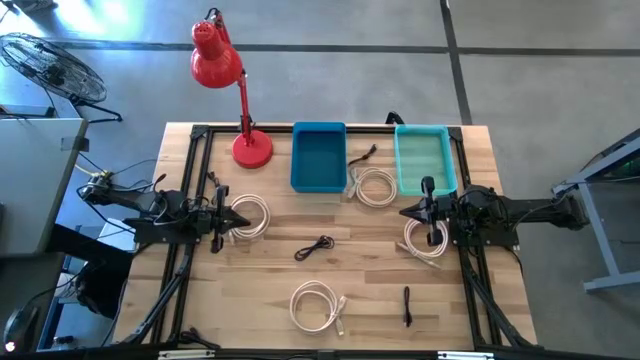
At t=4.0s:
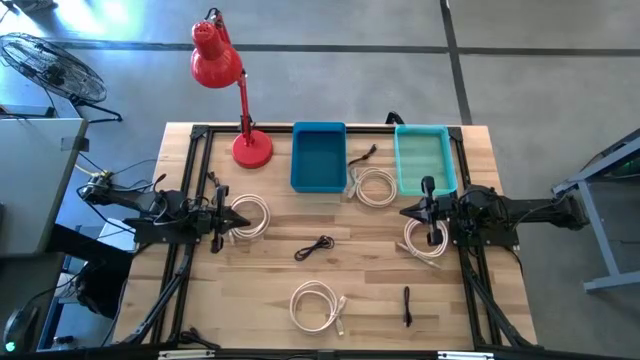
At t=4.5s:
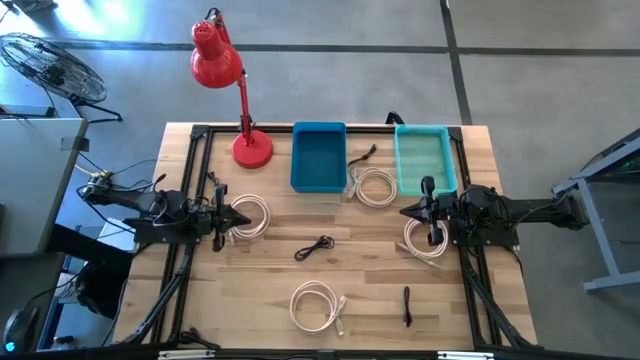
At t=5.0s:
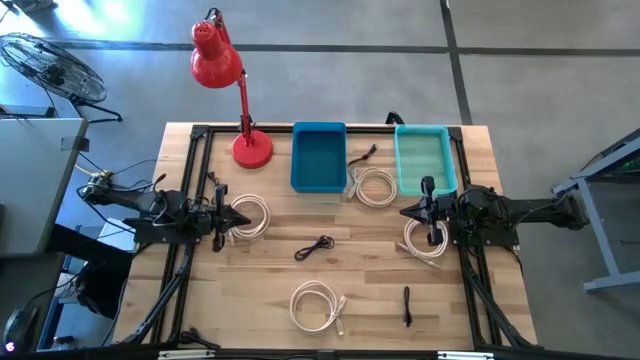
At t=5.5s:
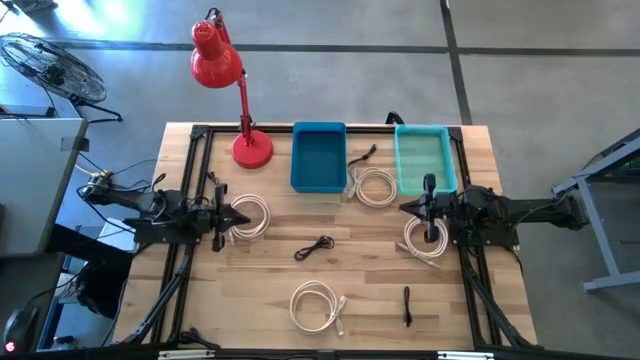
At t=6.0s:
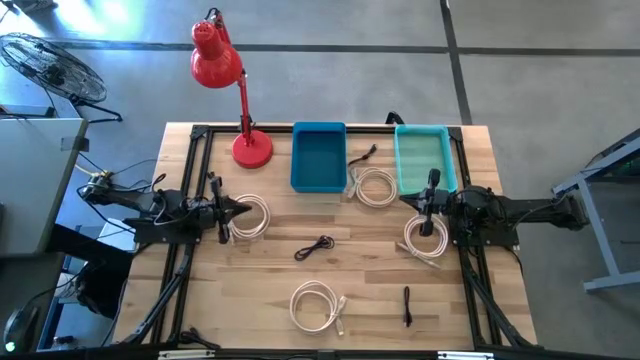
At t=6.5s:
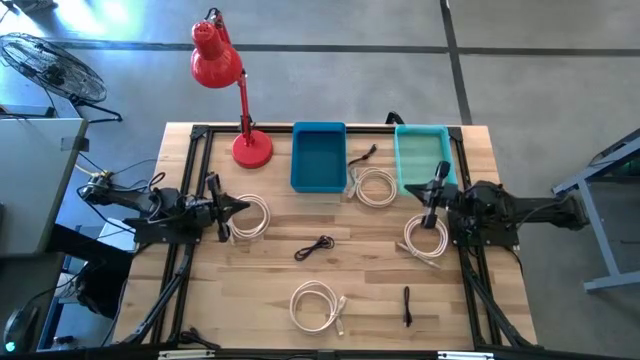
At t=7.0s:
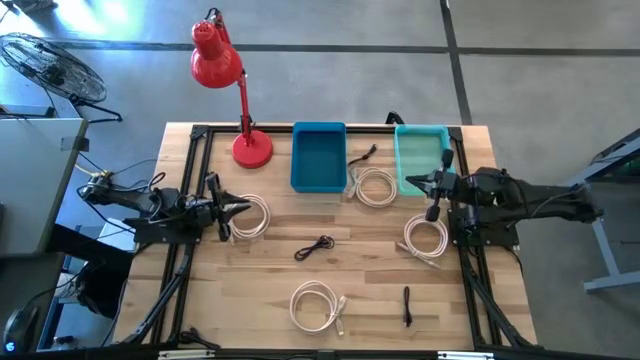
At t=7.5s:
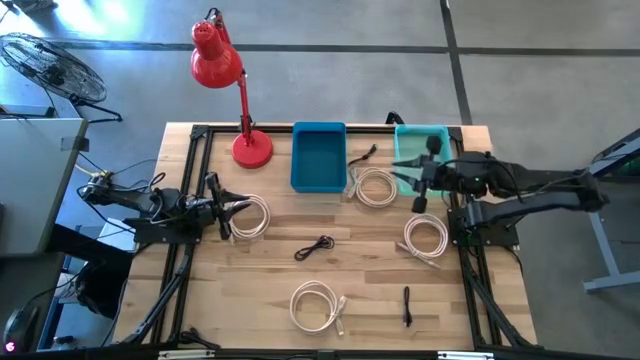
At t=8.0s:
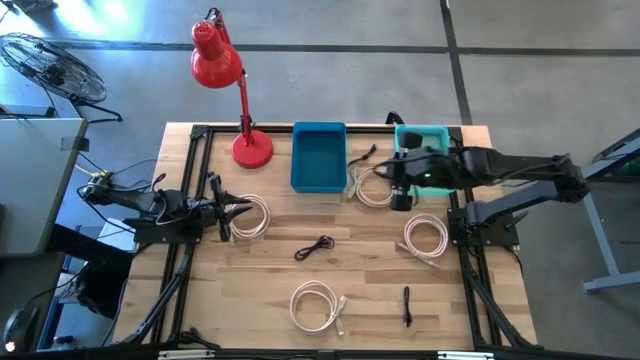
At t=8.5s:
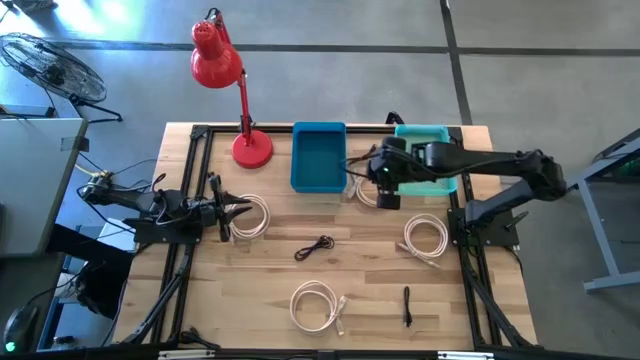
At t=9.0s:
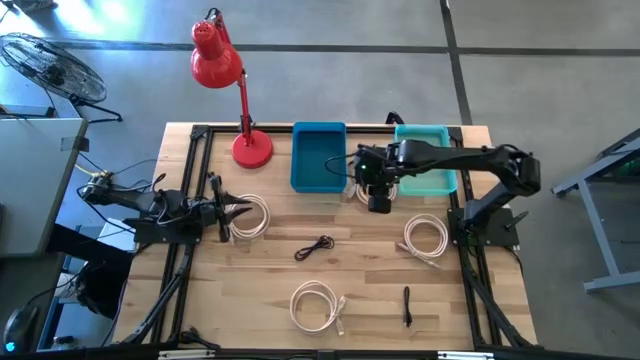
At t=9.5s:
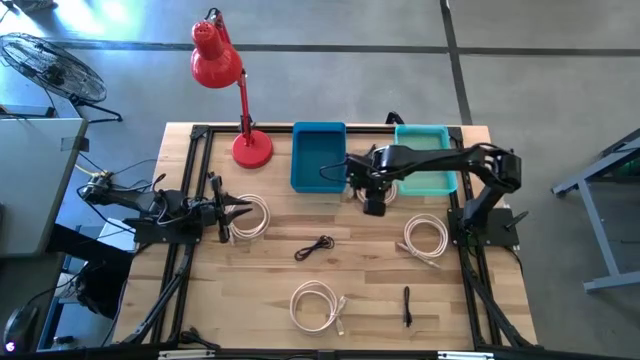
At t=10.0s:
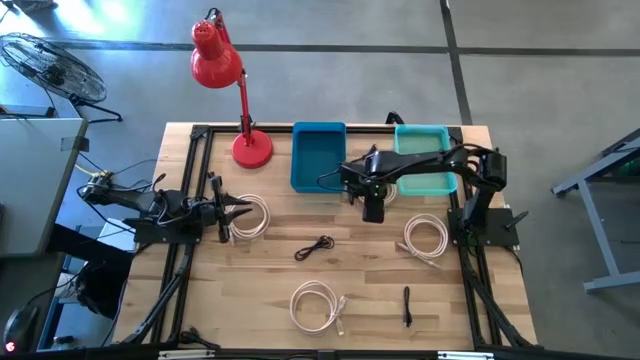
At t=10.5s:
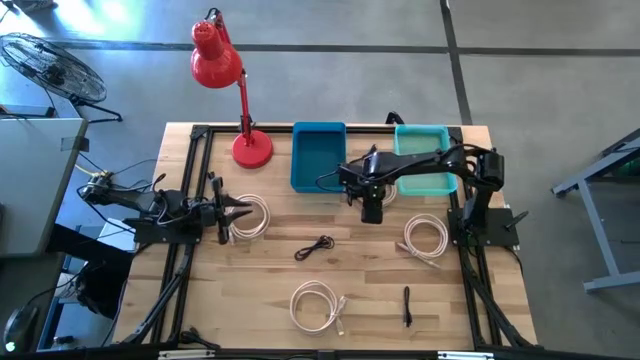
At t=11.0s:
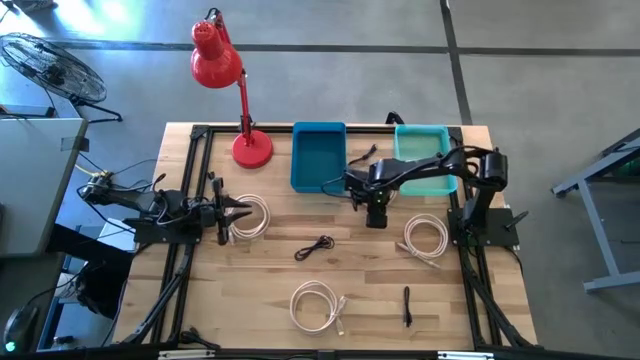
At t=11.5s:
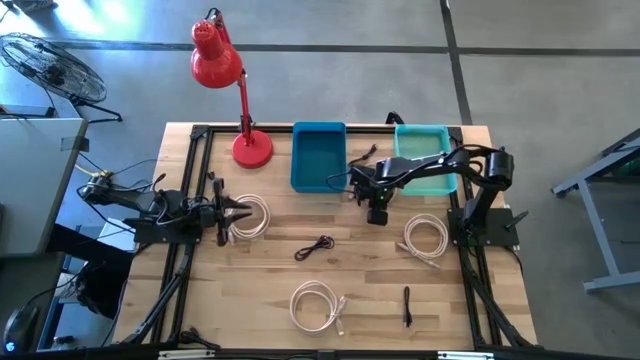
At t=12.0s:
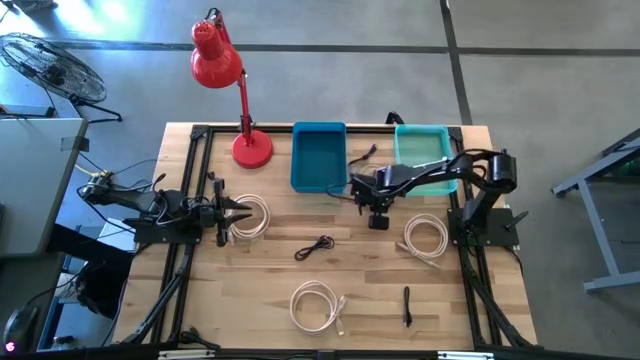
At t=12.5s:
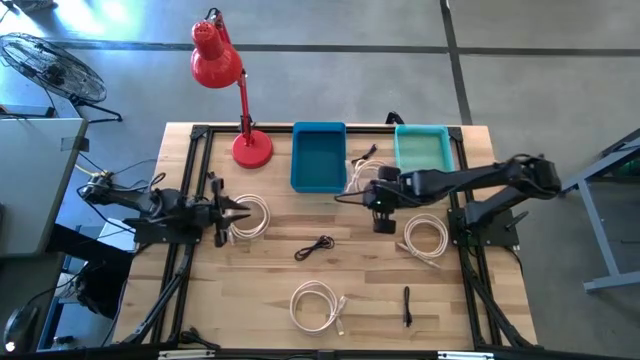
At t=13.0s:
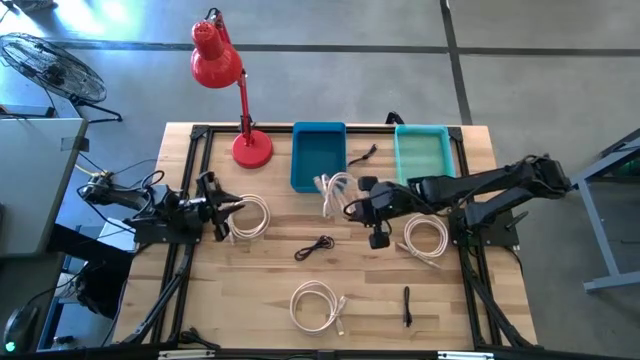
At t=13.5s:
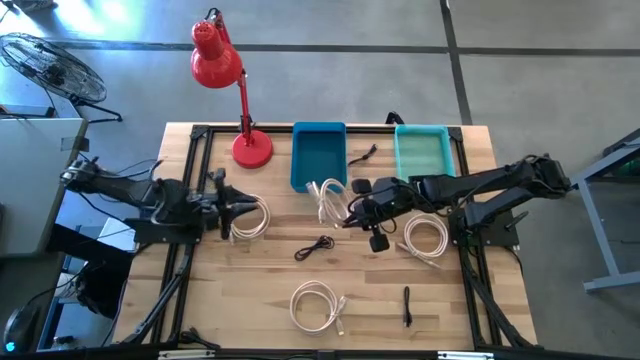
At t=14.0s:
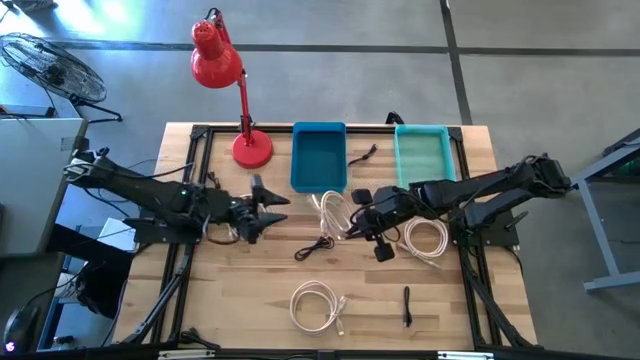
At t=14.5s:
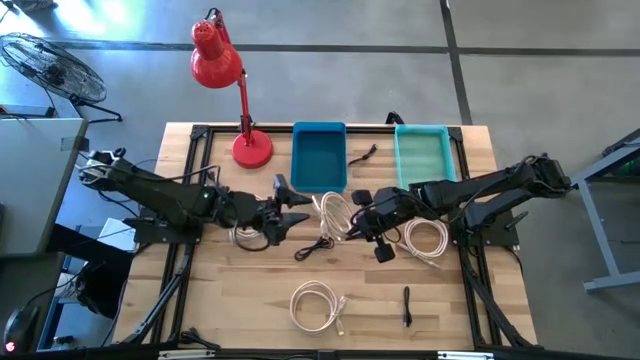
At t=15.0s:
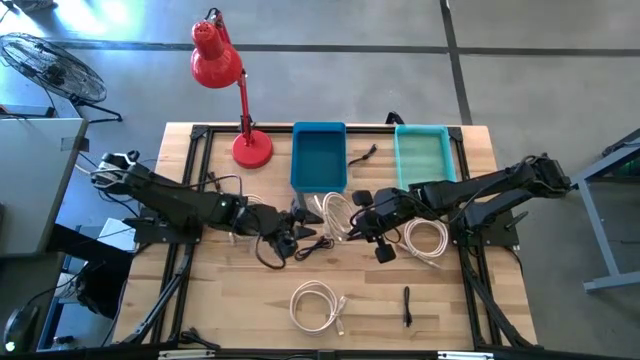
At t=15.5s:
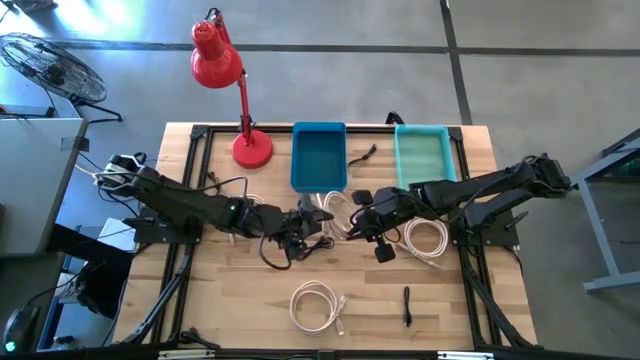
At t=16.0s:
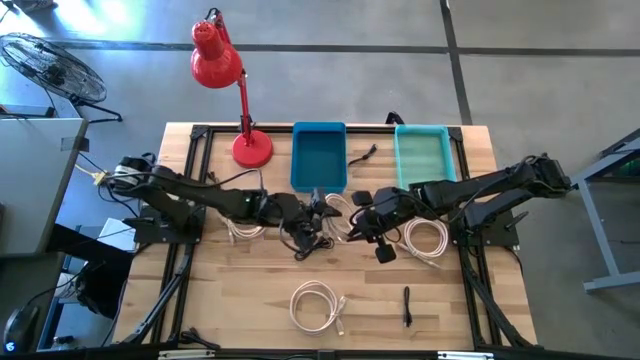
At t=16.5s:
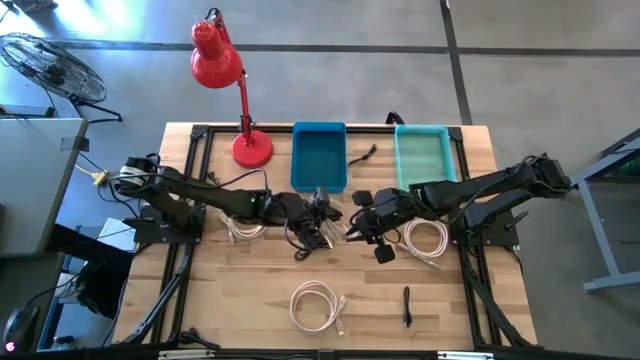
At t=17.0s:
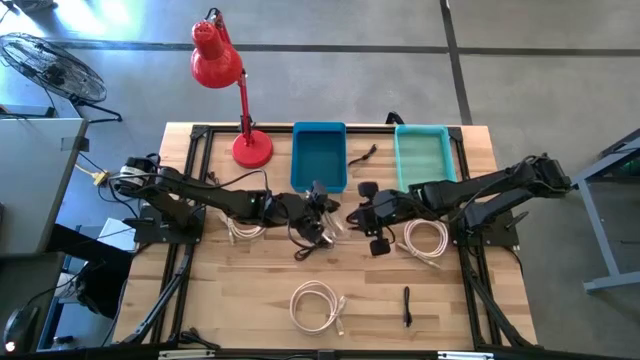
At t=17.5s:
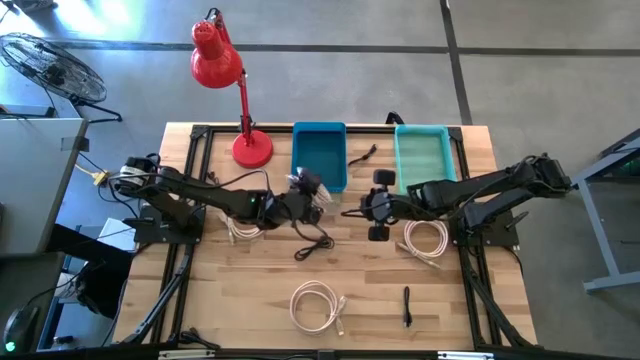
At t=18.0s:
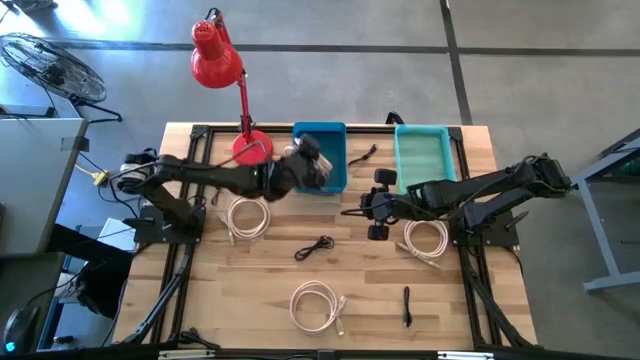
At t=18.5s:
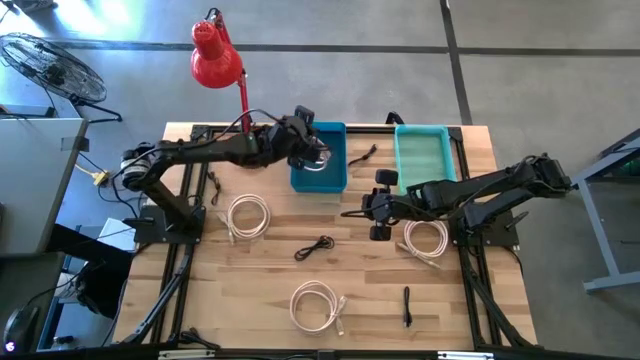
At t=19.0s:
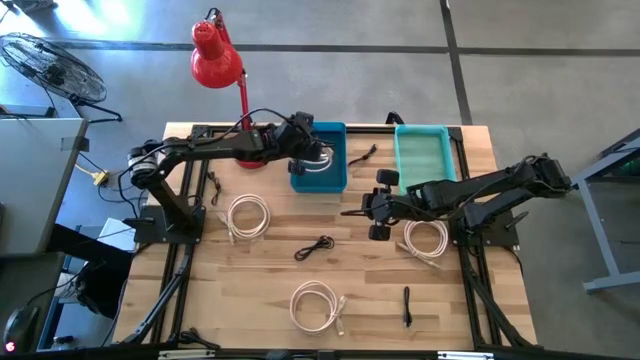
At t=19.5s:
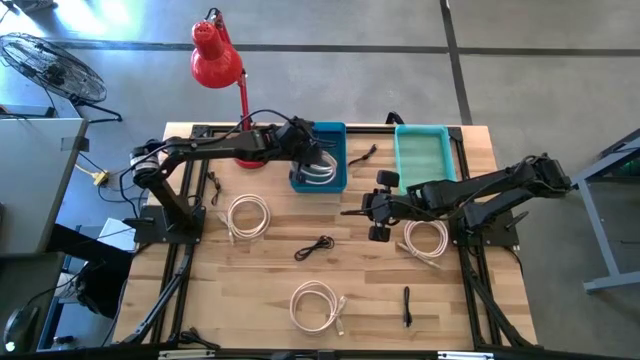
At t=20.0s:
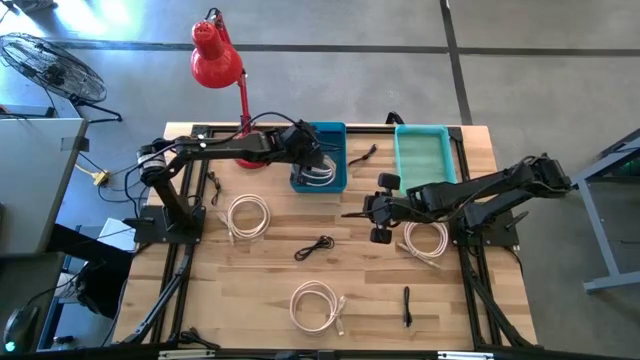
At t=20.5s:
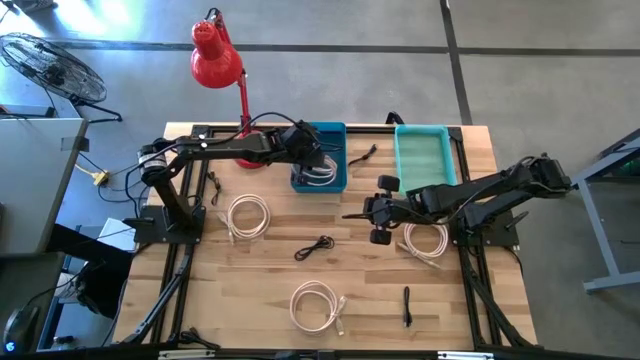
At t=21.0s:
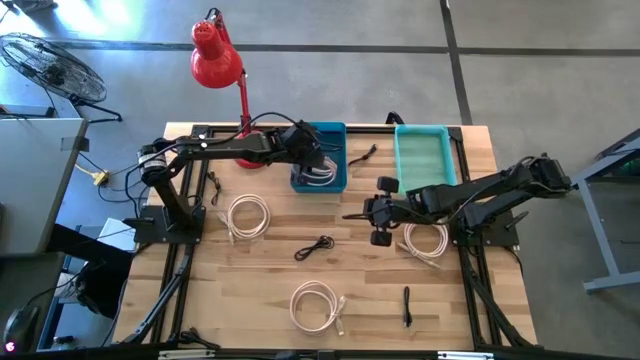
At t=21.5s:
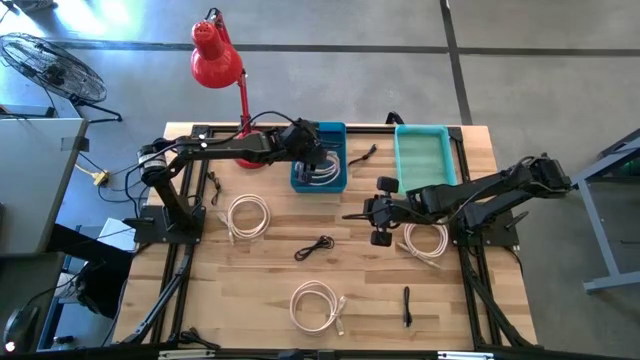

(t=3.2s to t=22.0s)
Task: Pick & Place USB Port
Put the brown HDMI cable in the blue bin
